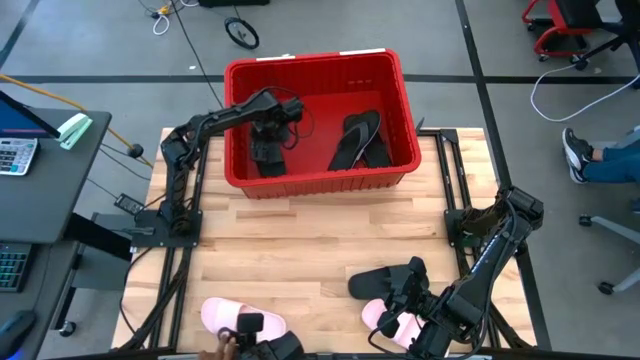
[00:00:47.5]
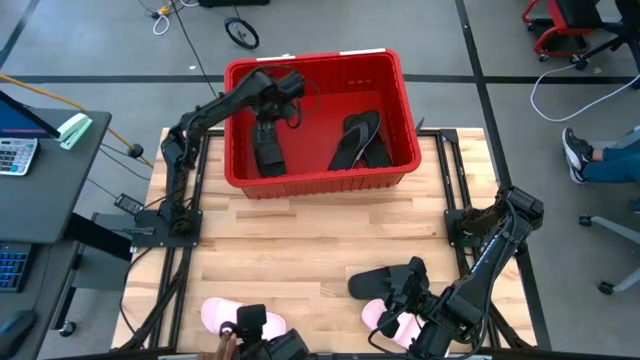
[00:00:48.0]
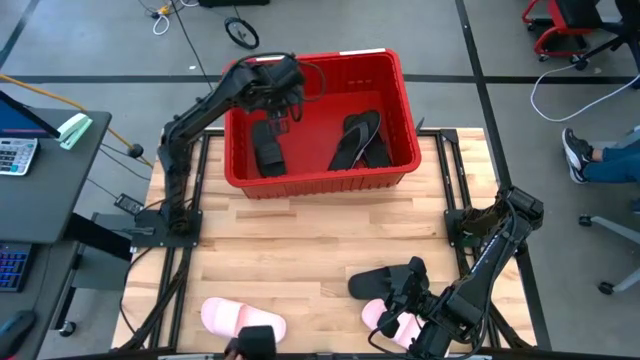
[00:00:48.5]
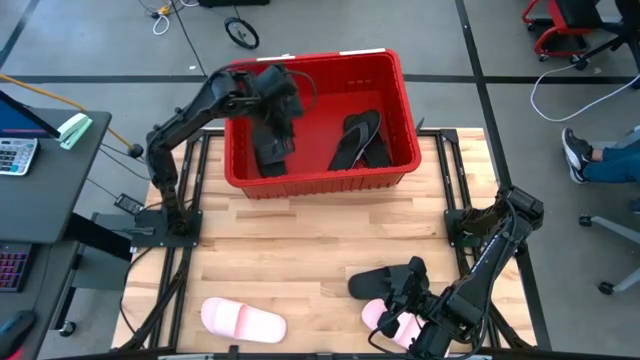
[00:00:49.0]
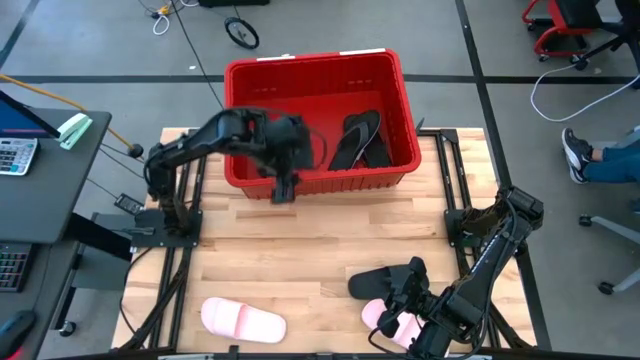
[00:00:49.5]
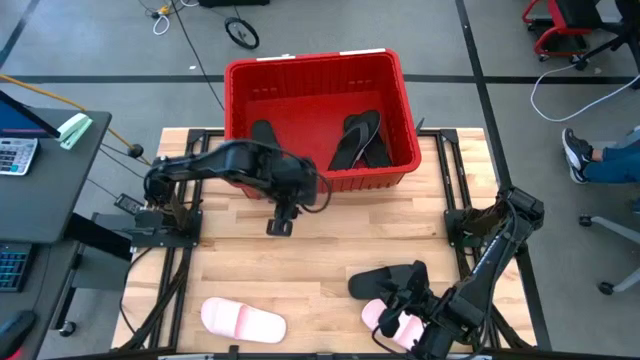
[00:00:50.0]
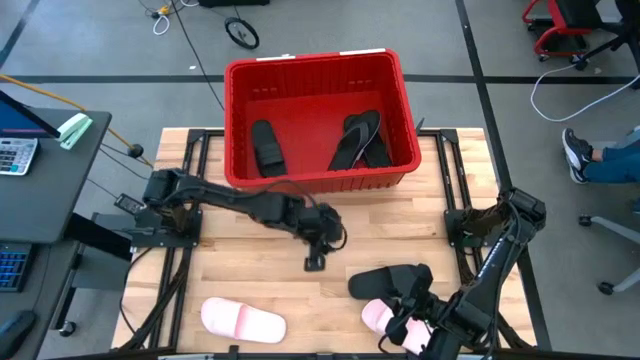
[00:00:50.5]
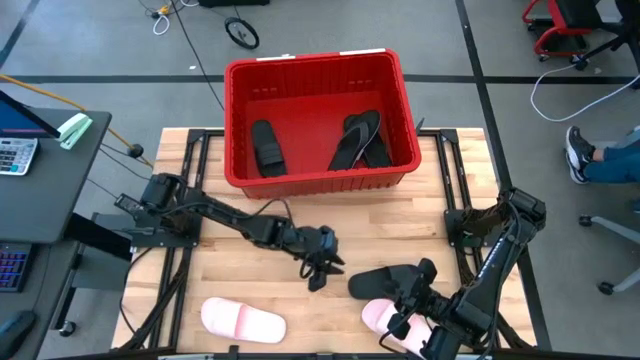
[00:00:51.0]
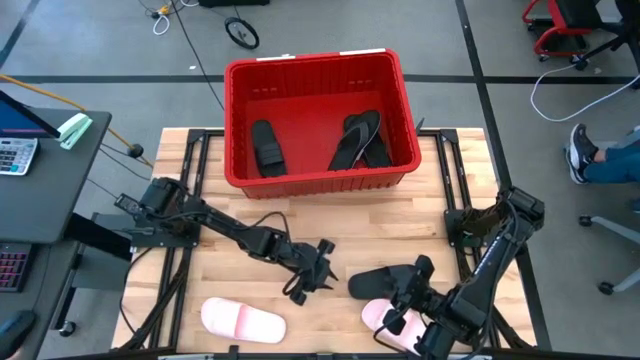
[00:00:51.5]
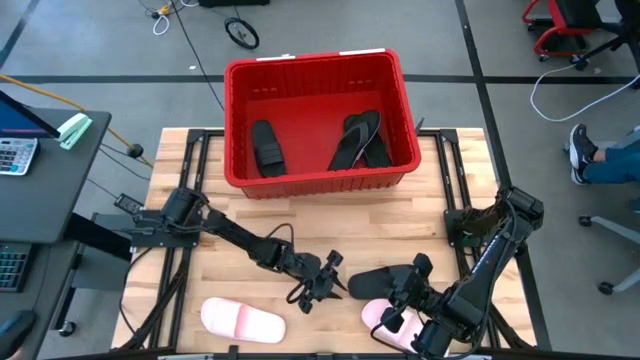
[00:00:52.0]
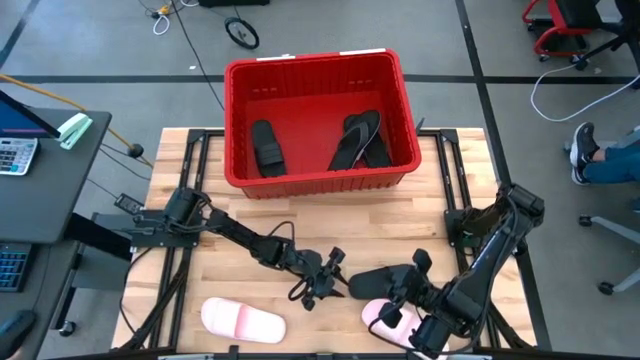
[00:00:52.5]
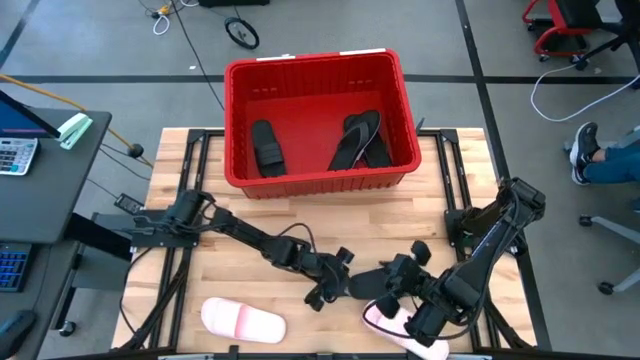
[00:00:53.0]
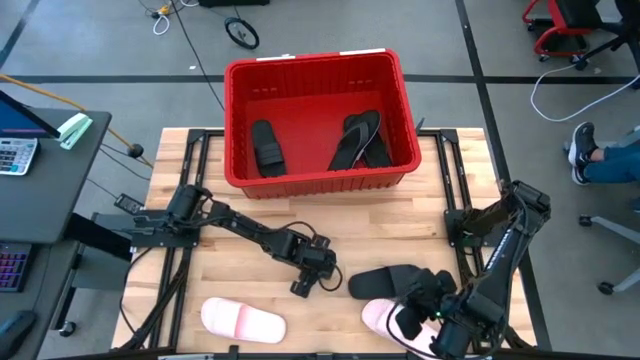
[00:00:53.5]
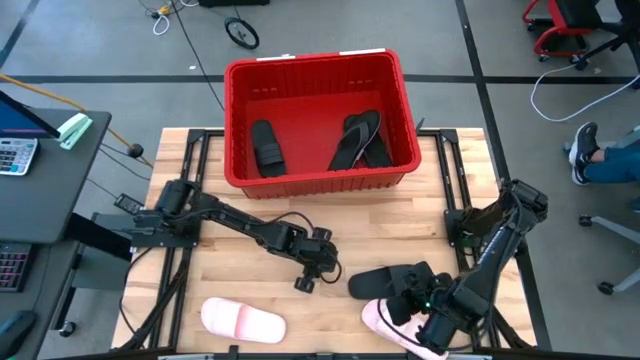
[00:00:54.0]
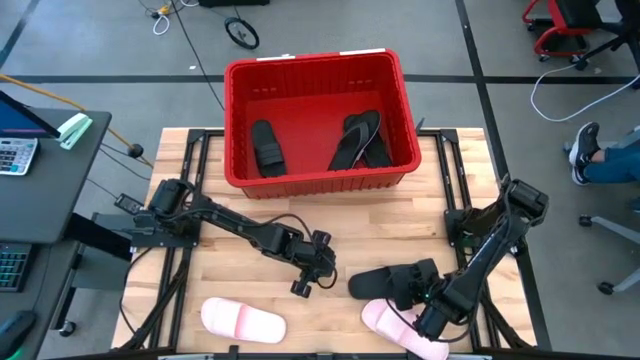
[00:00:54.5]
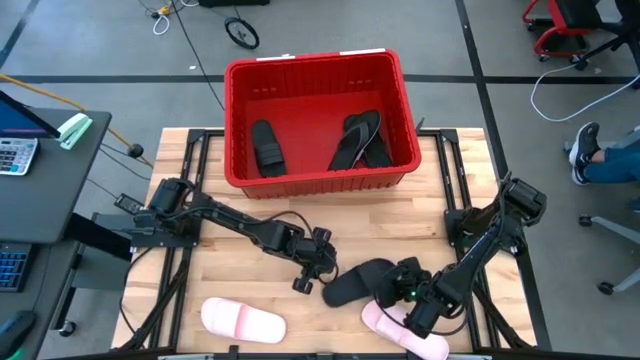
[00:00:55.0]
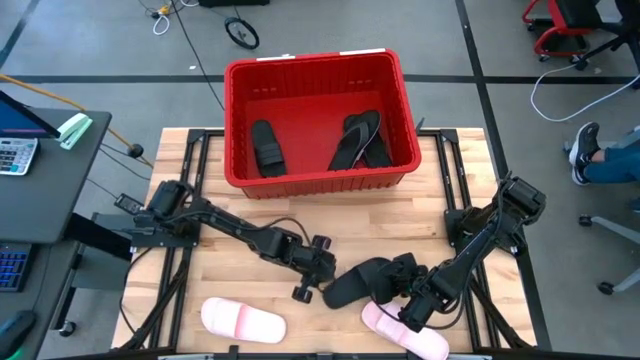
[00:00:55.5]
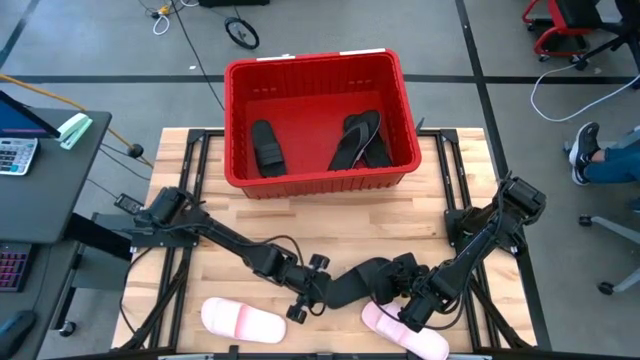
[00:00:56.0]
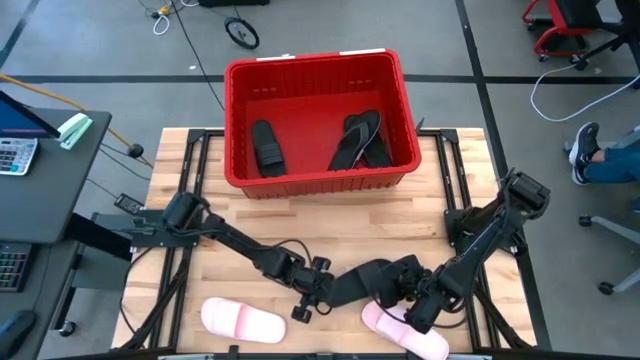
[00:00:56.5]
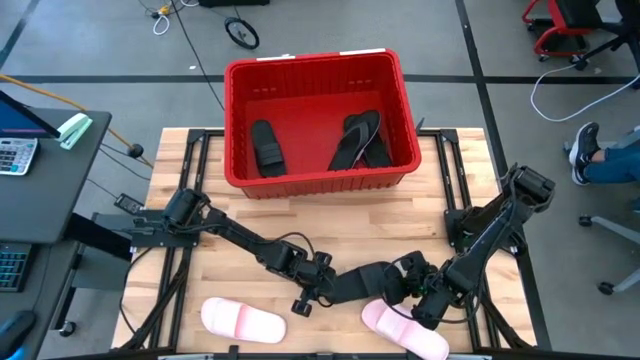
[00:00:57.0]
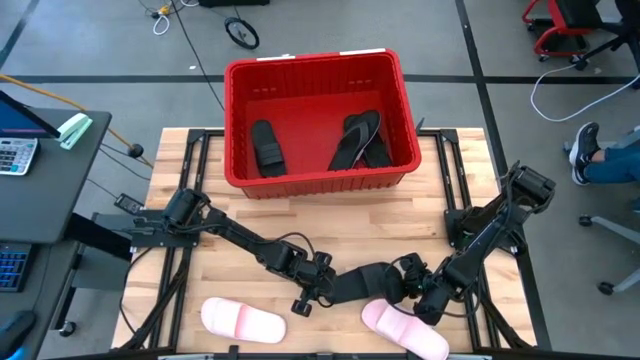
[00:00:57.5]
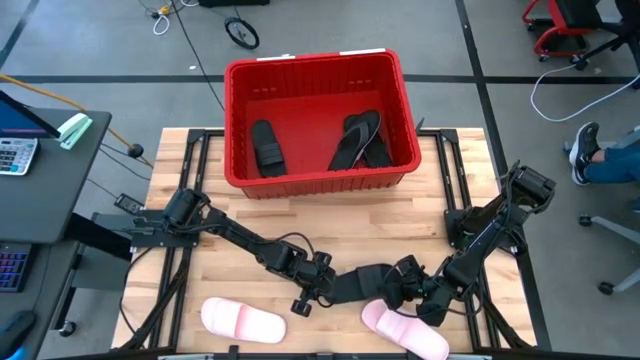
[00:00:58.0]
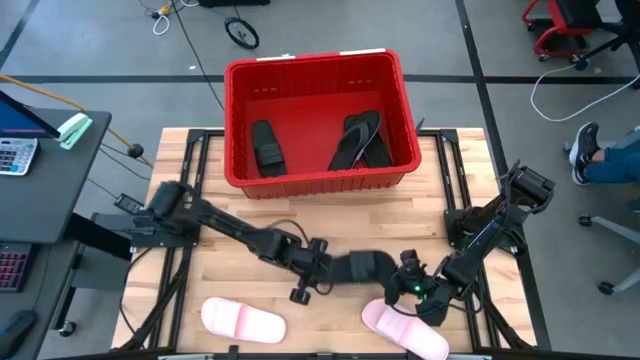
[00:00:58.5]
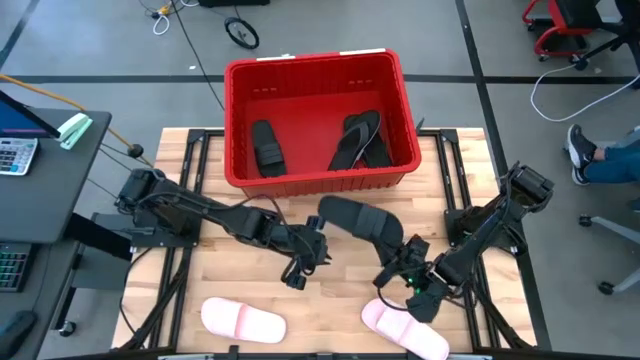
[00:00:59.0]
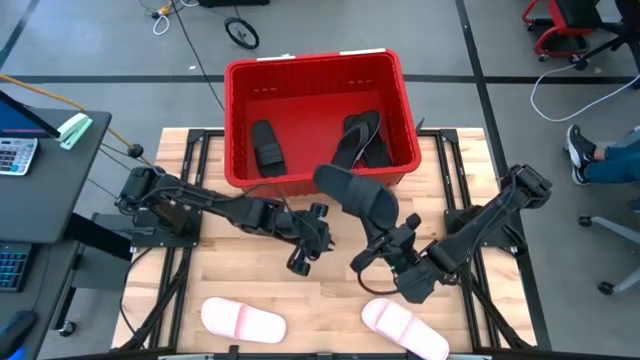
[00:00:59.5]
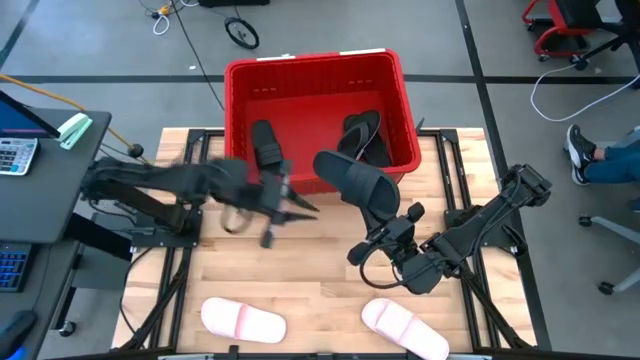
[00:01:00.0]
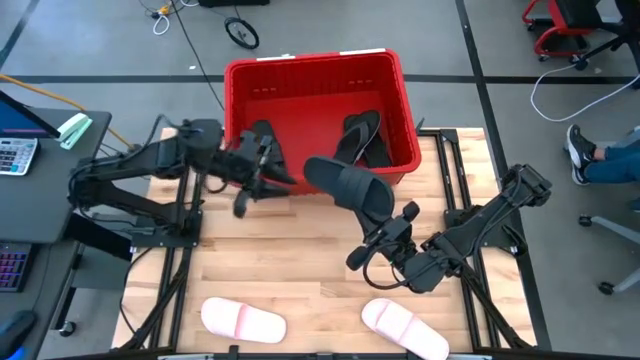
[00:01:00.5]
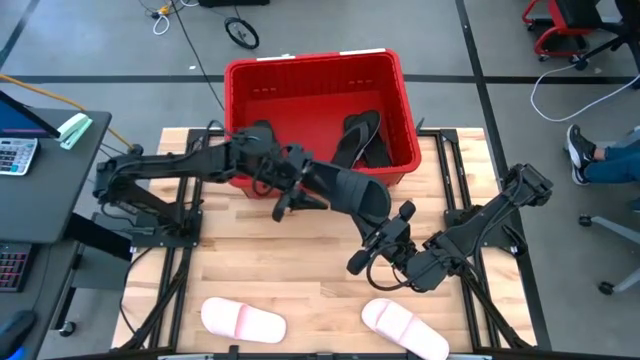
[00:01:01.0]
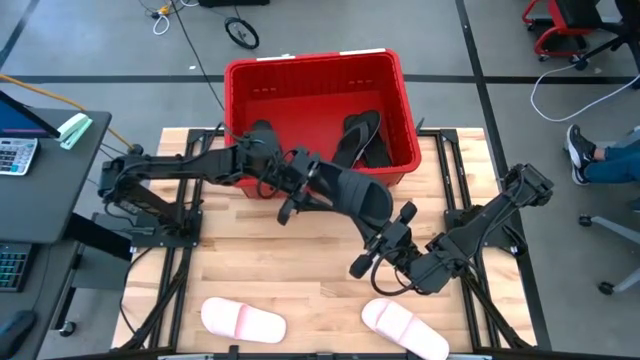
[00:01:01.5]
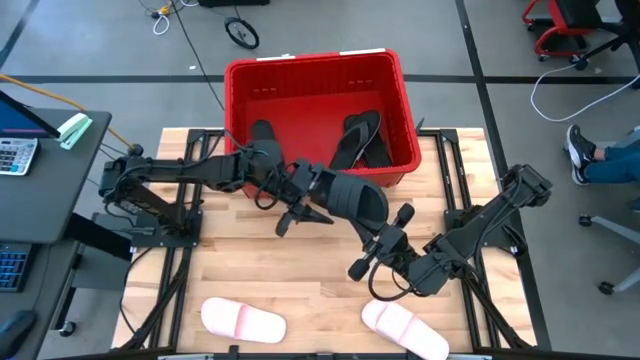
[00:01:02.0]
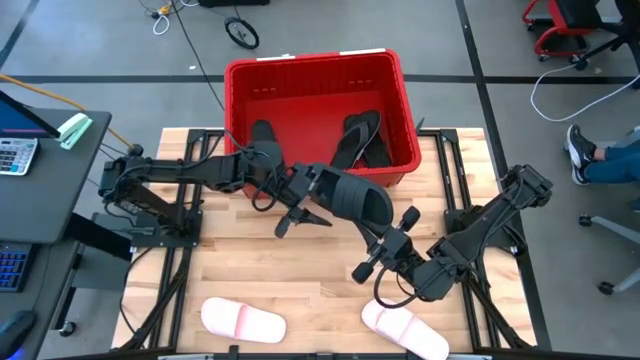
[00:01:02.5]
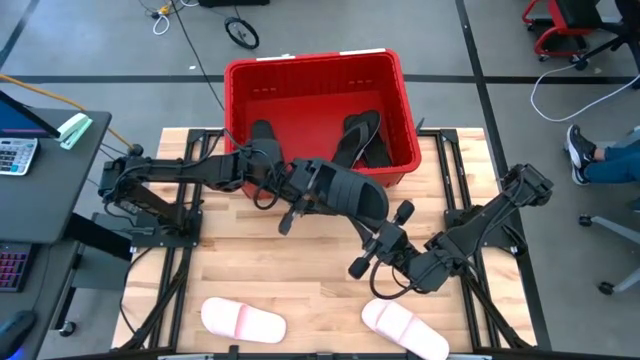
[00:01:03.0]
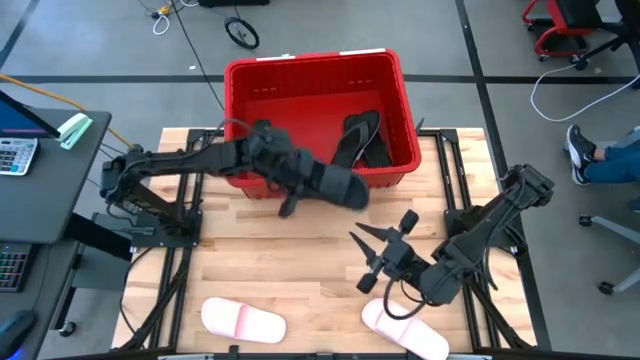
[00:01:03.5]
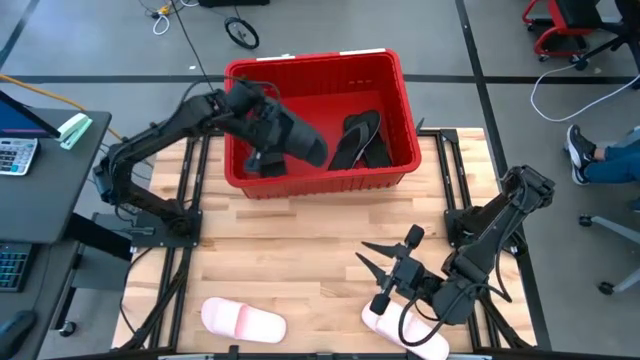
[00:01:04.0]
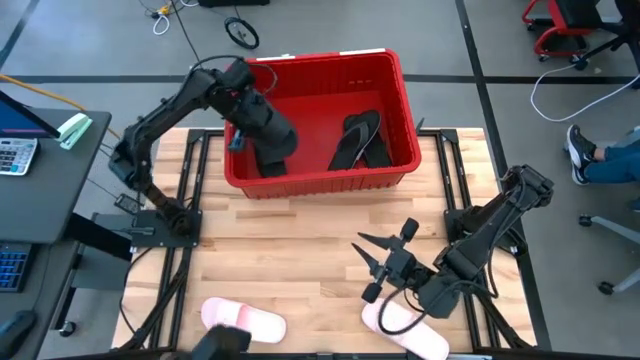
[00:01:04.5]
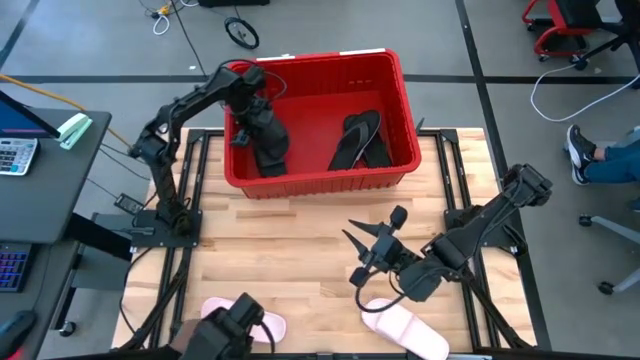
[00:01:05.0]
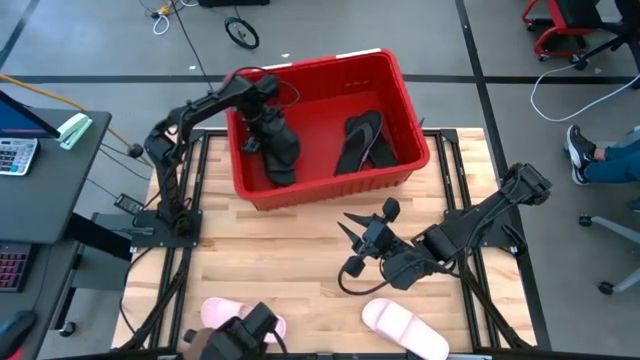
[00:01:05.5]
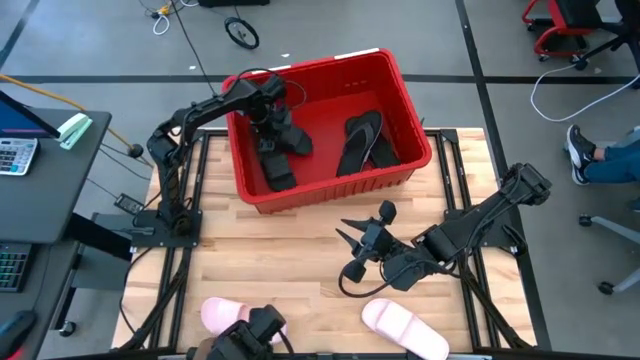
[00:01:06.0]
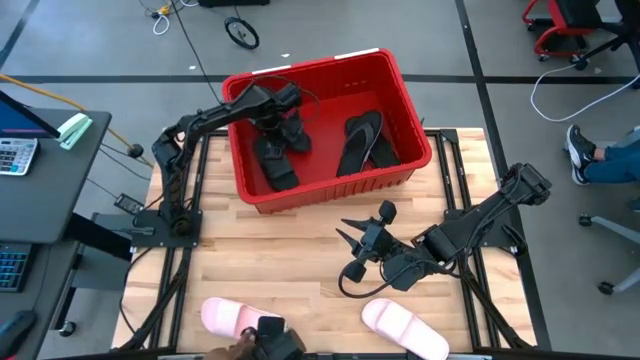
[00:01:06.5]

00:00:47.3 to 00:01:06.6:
Task: Pick and place slides into bin
Put the black slide into the red container
